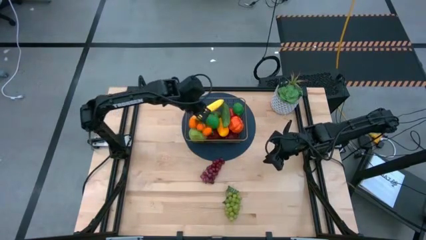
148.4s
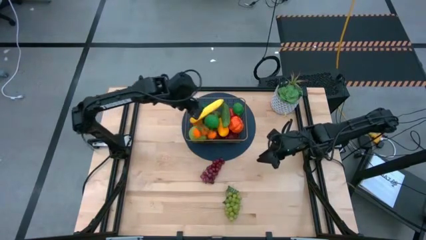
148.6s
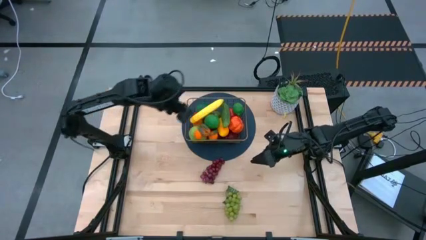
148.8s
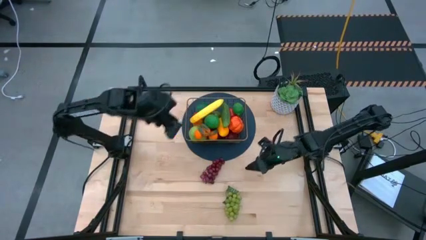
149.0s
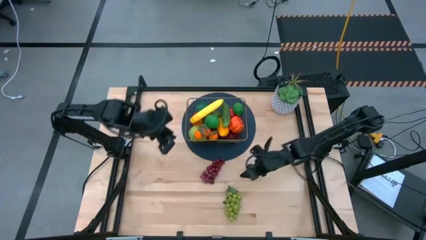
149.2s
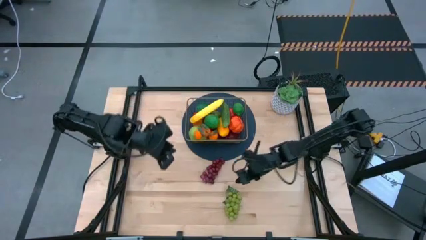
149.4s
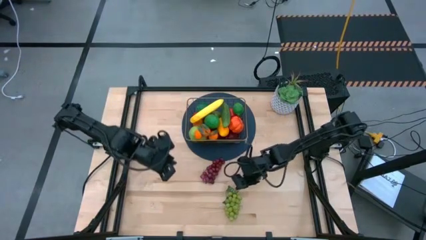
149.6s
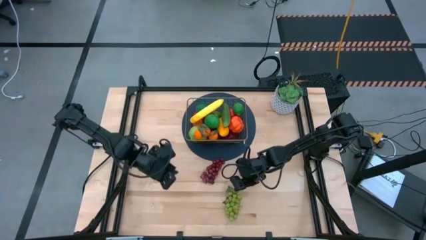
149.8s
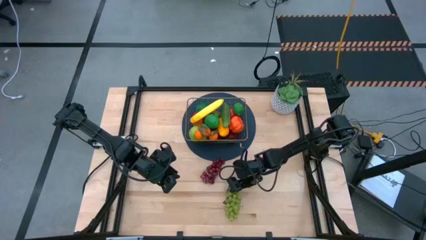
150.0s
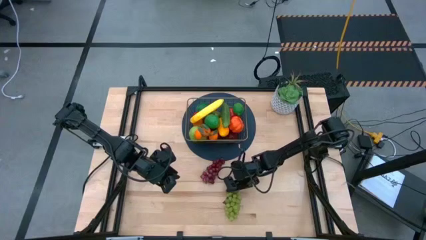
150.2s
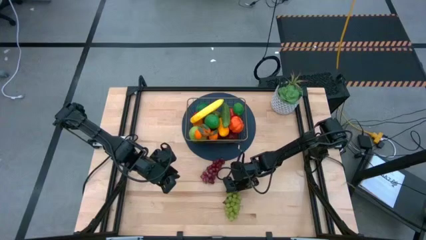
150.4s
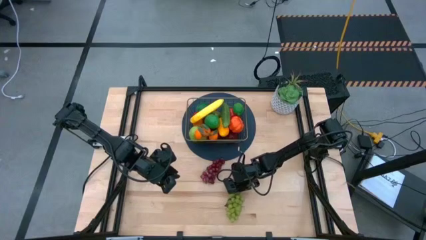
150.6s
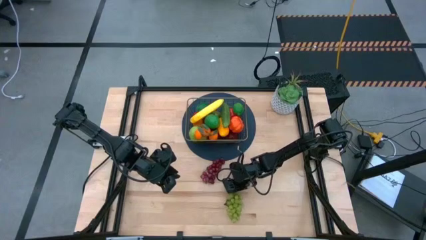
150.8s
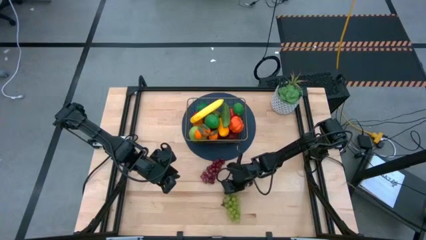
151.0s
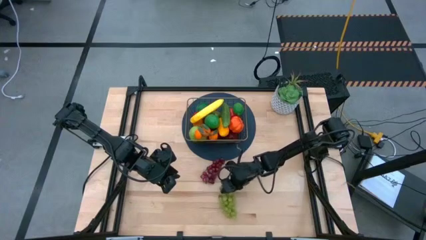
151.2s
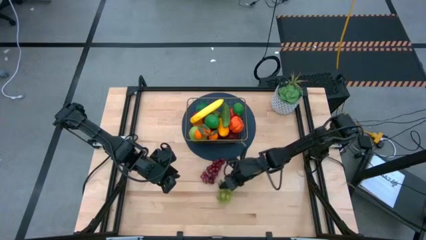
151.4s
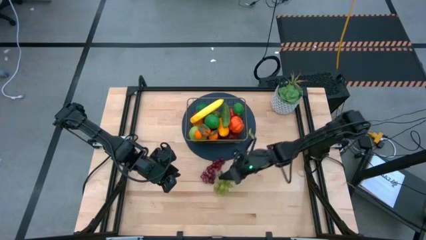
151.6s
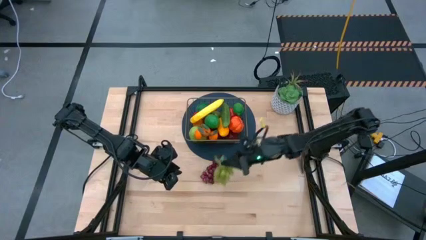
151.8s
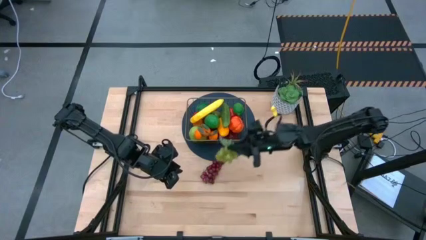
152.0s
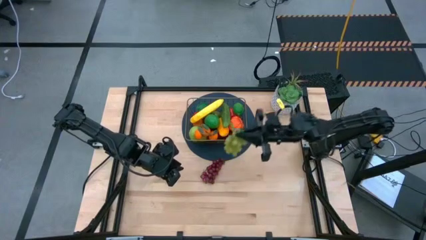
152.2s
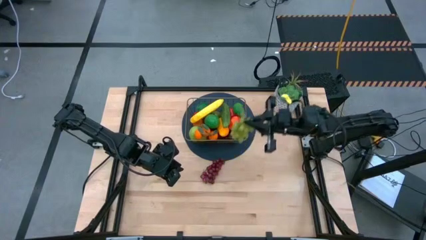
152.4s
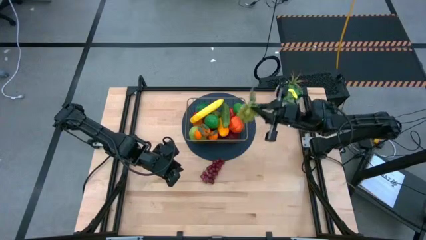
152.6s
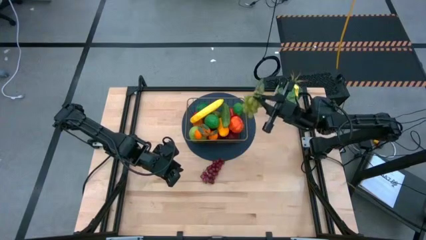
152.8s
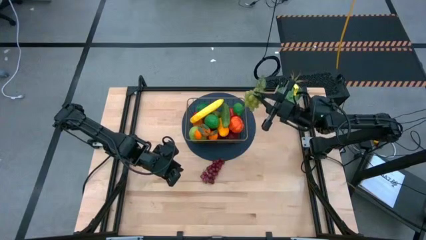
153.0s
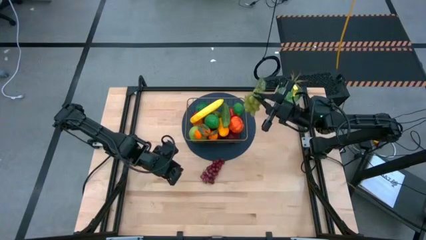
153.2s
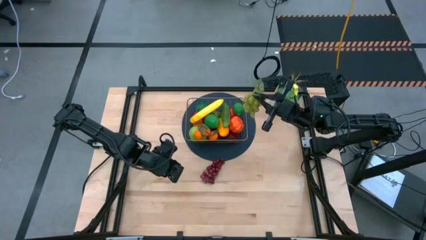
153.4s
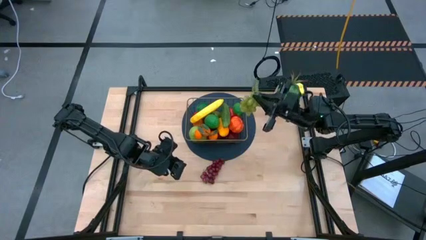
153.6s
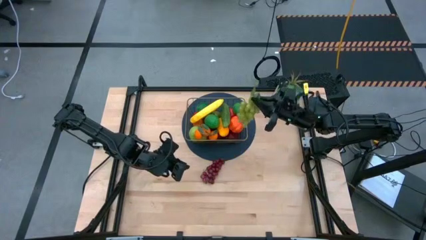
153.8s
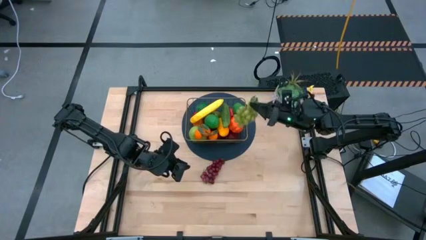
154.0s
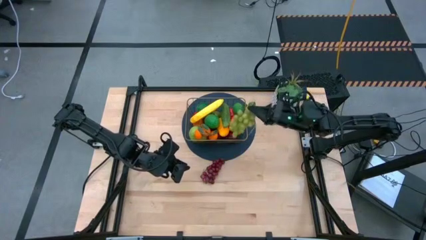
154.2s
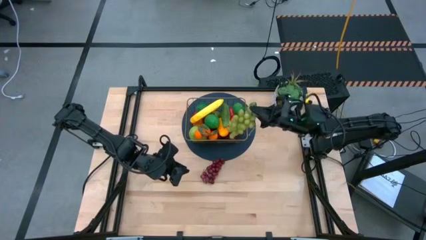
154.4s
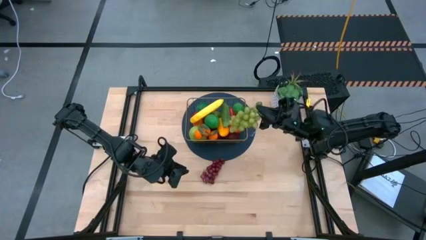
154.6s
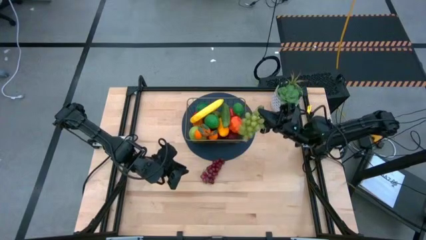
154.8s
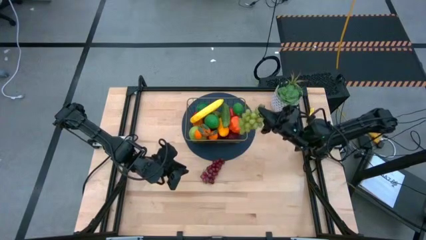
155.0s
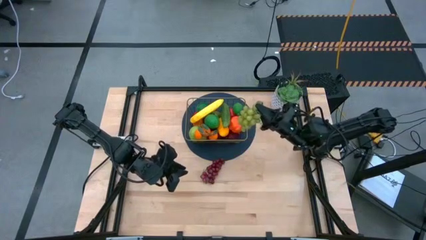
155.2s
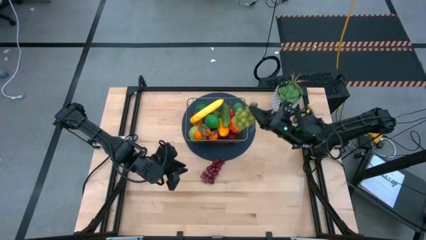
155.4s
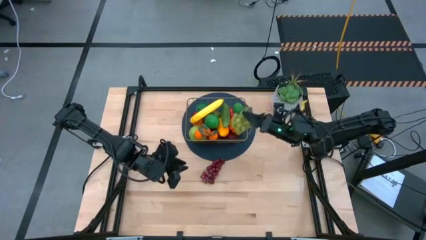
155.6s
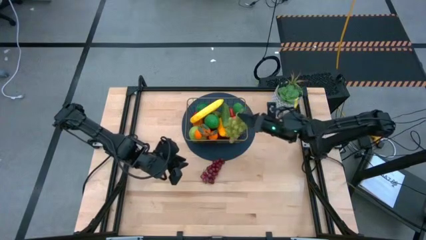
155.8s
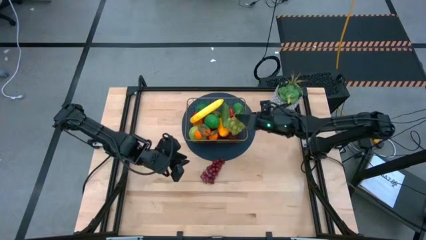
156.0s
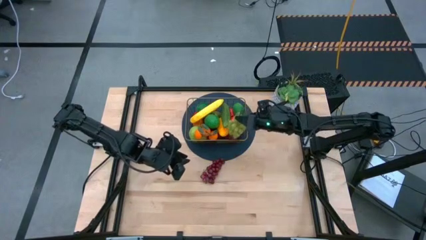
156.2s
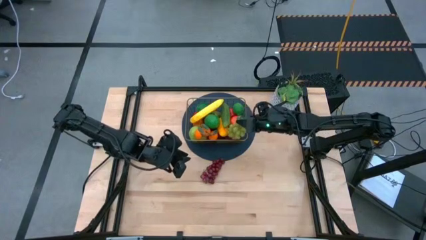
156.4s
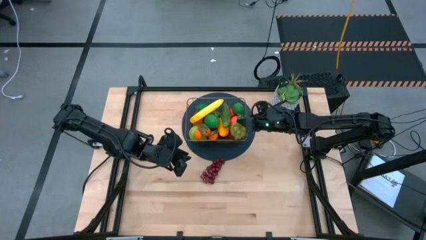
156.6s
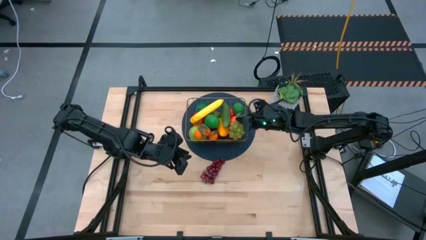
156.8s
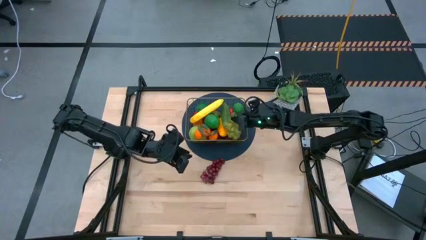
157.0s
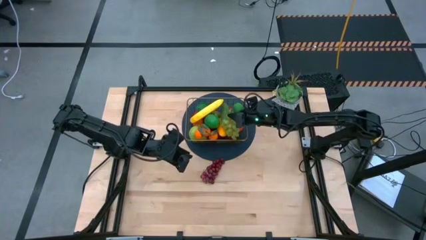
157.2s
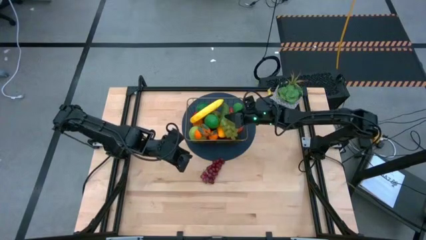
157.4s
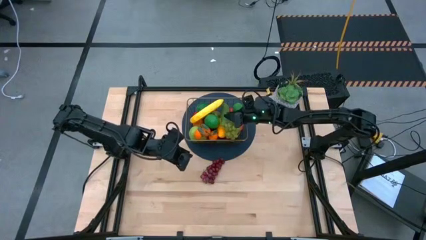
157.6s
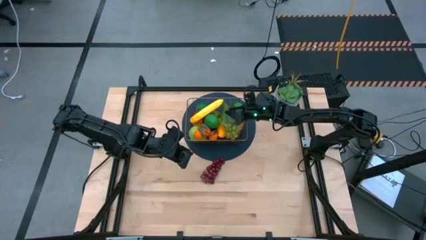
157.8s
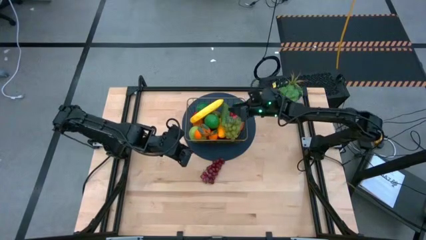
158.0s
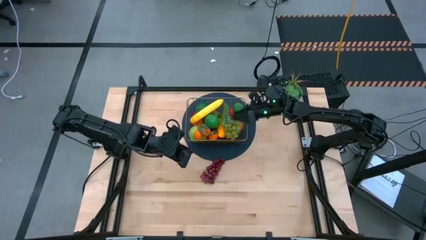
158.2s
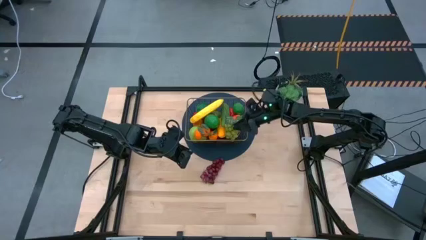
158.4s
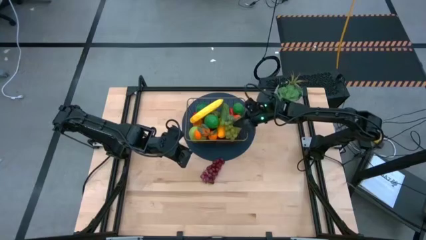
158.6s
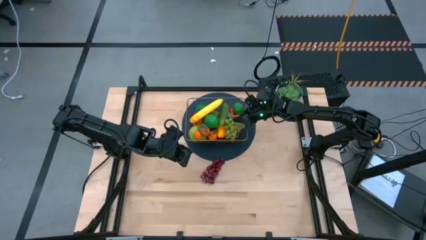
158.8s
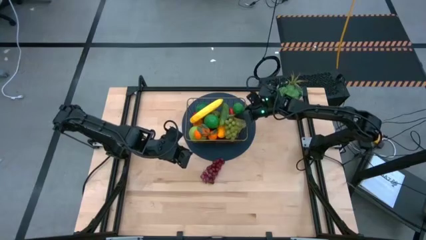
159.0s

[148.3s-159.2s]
Task: Build produce basket
Put the green grapes into the wire basket

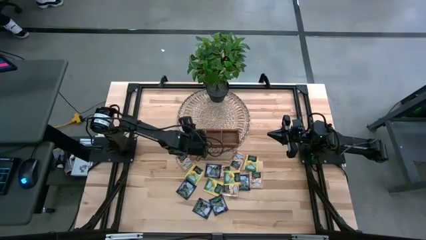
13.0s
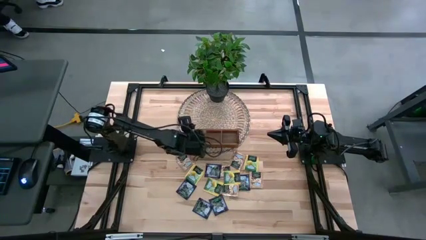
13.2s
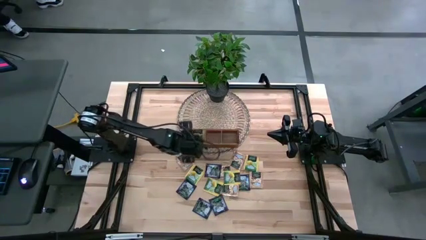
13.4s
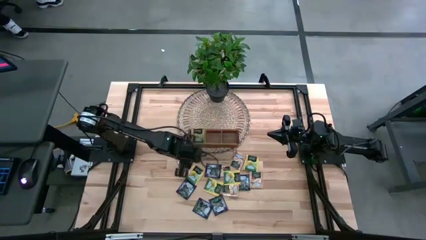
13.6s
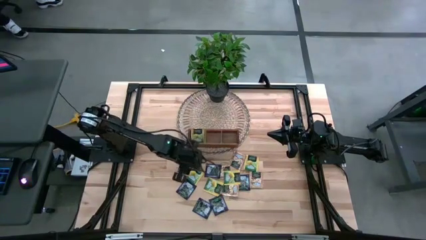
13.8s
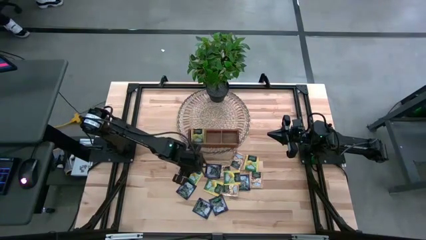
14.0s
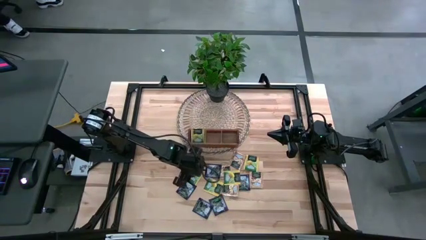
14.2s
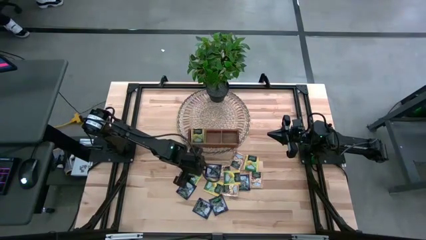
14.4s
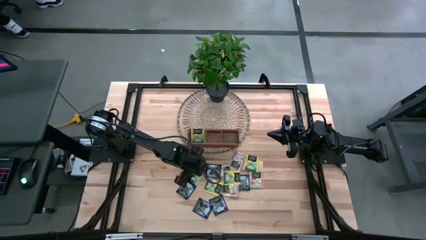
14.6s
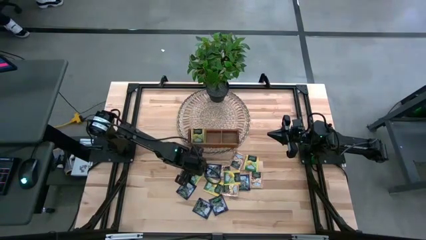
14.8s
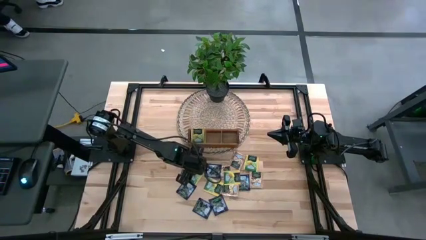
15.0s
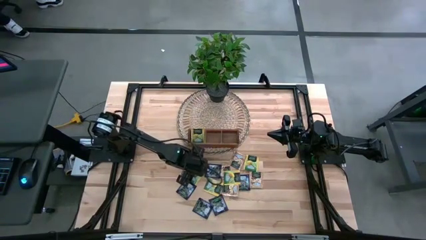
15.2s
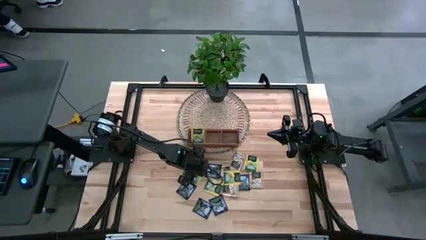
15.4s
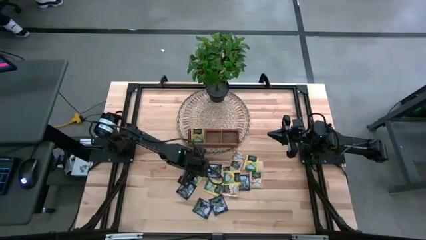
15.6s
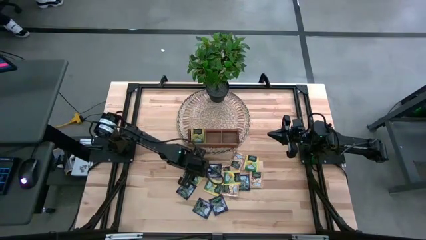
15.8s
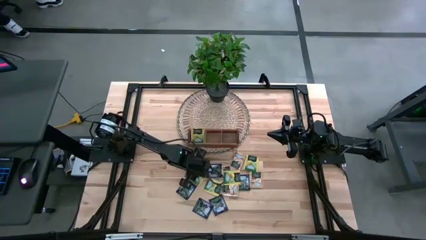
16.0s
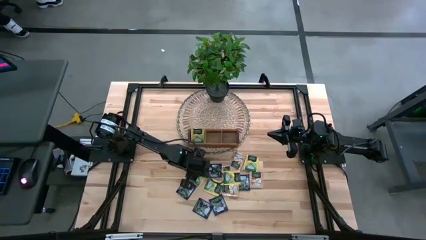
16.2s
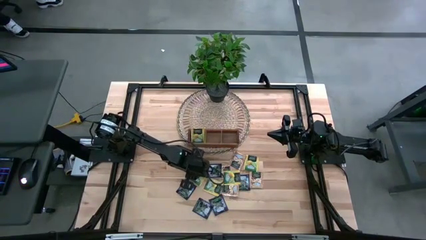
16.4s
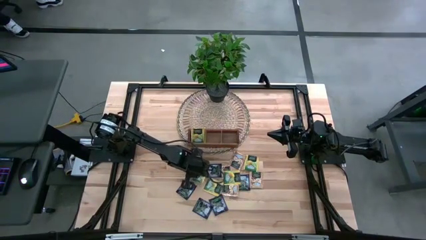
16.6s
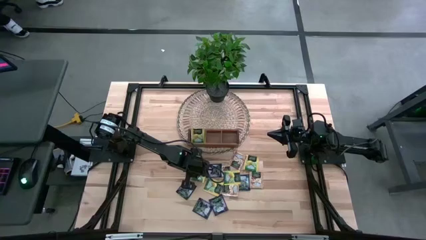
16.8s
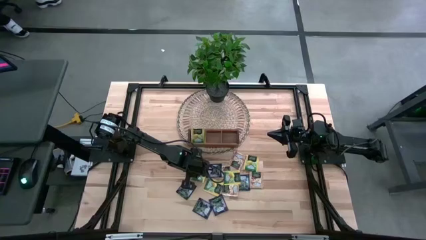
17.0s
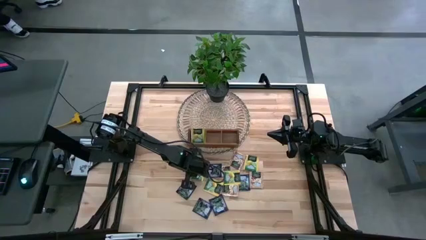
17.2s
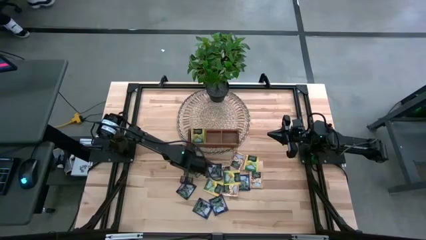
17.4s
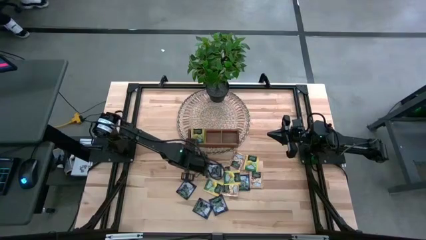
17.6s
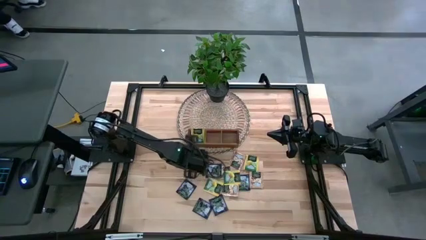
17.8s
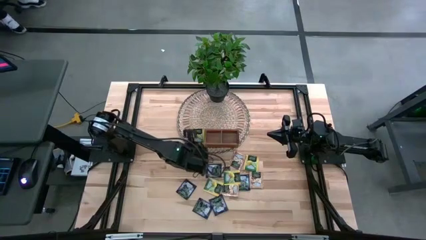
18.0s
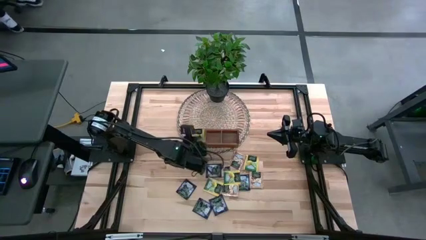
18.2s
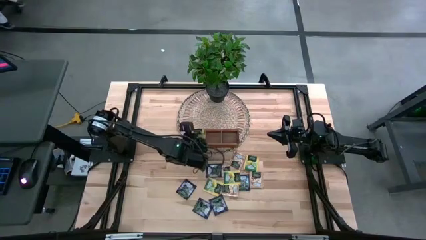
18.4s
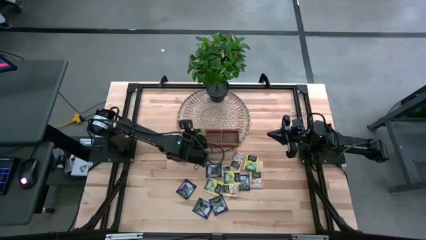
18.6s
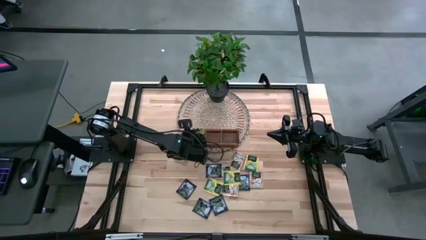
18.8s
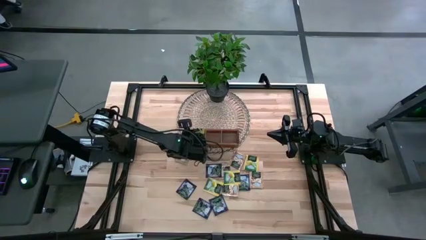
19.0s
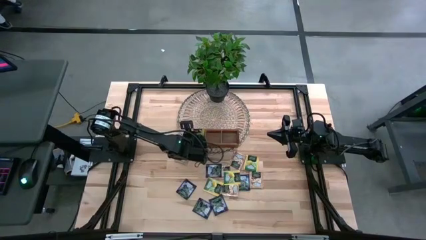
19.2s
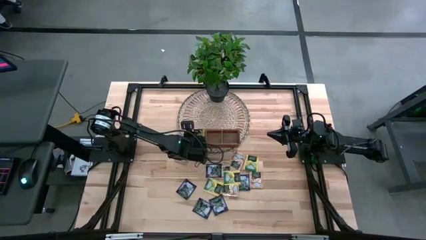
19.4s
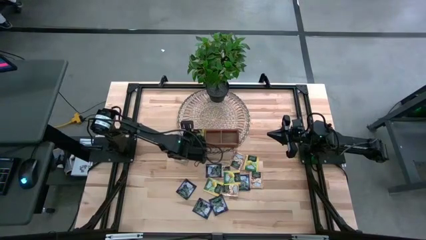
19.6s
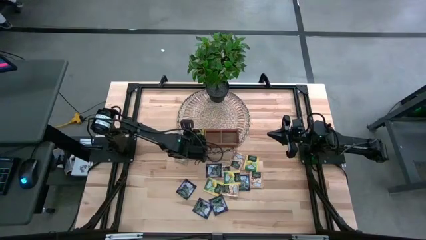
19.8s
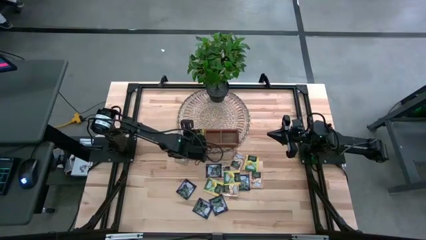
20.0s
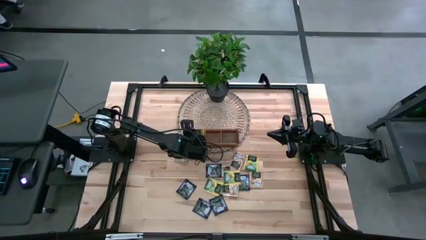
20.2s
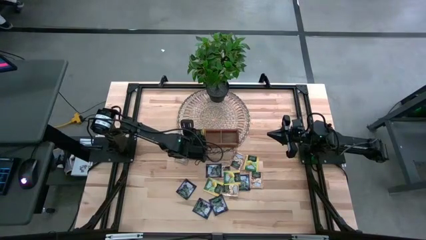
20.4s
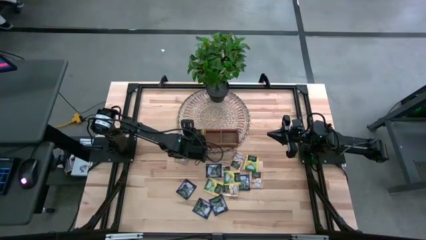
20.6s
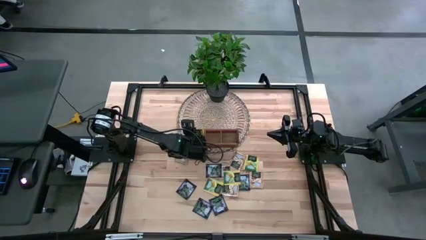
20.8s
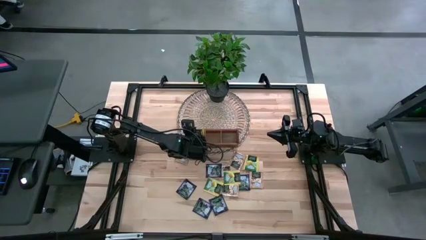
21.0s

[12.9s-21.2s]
Task: Pick & Place Tea
Put the green tea bag into the left section of the wooden organizer
